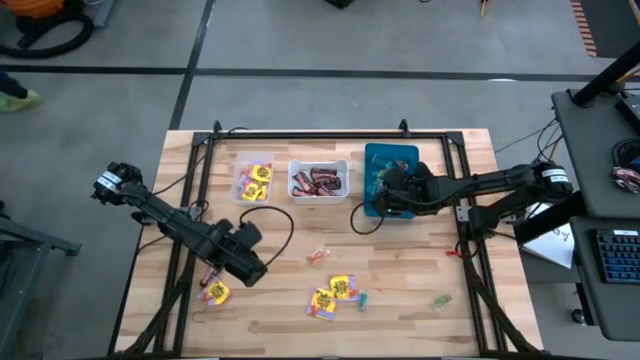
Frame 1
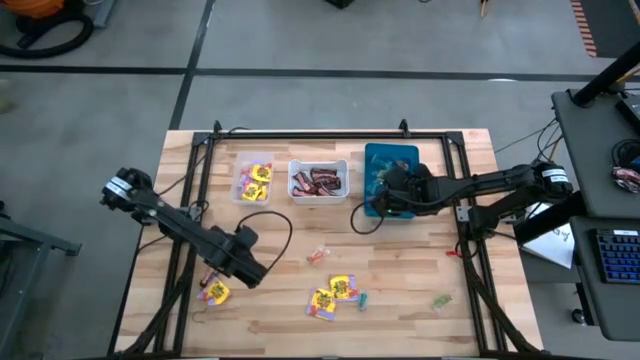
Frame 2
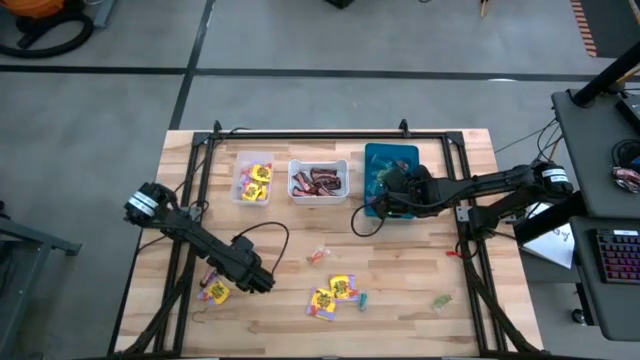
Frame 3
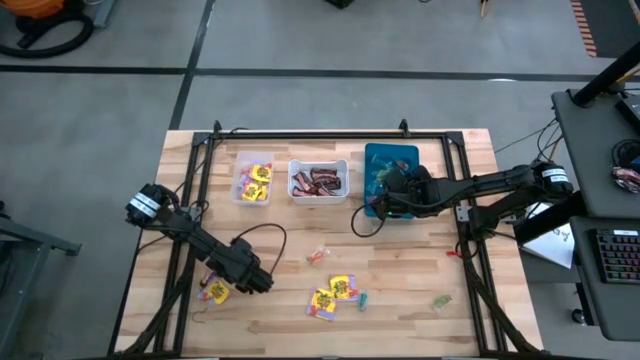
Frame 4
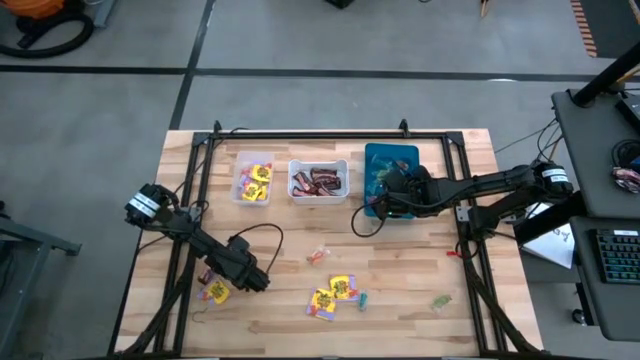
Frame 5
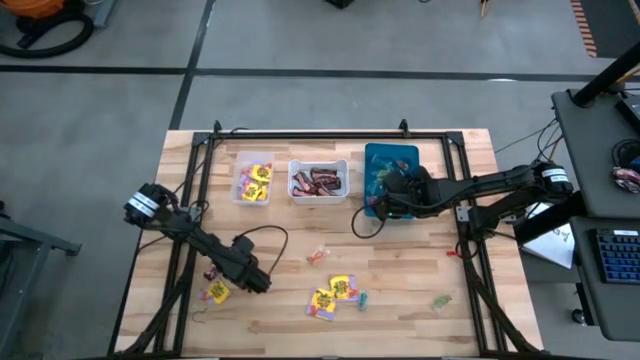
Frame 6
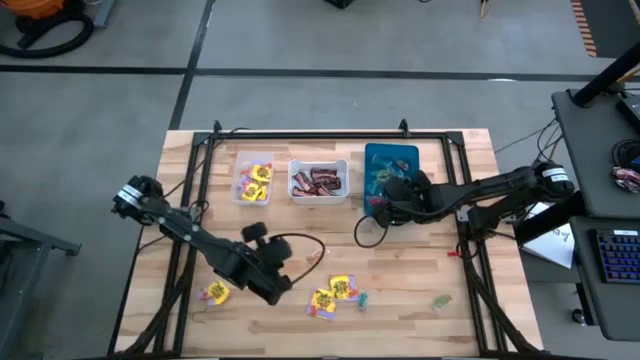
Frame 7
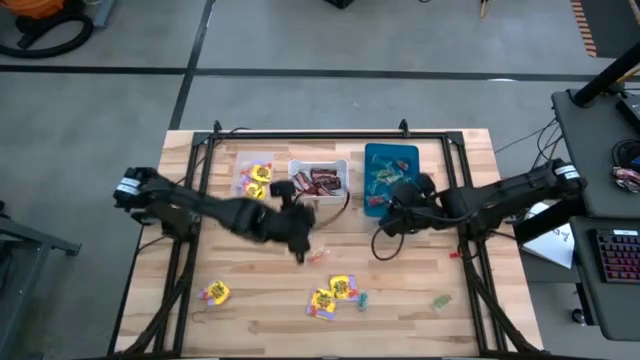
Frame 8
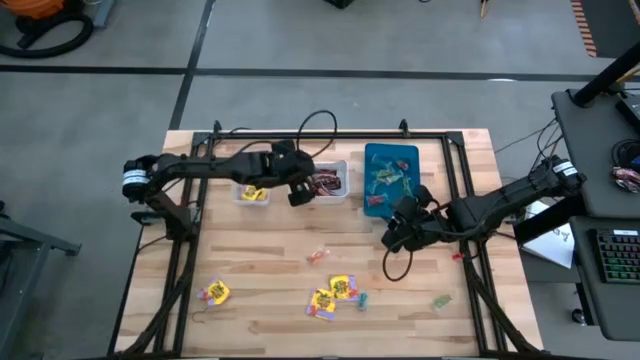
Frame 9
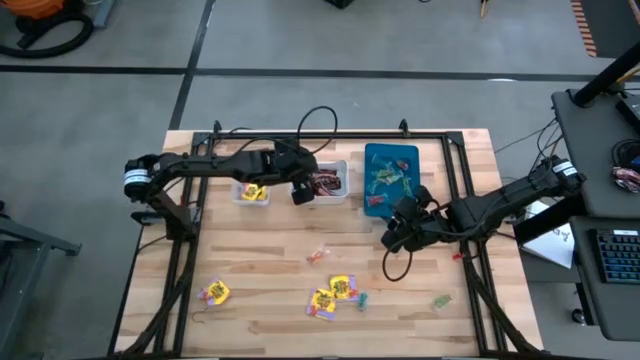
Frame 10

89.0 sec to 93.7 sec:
Task: Sort candy
Put the brown chocolate into the white bin

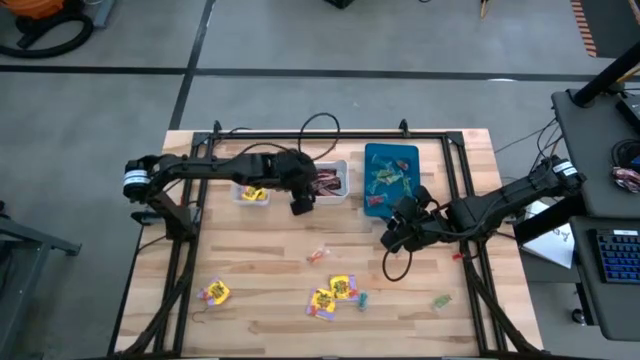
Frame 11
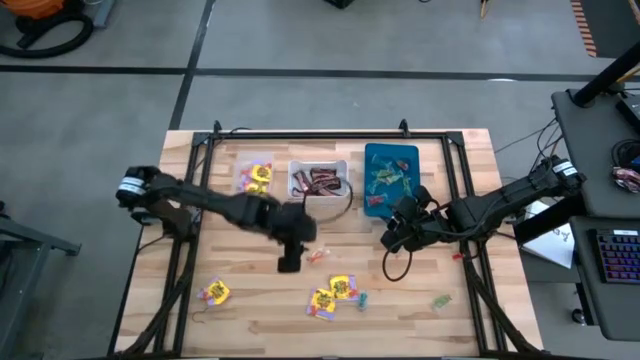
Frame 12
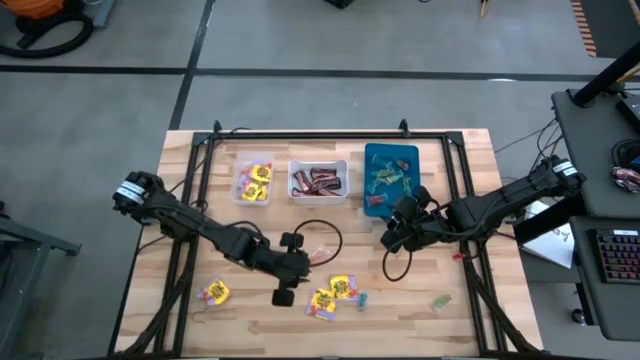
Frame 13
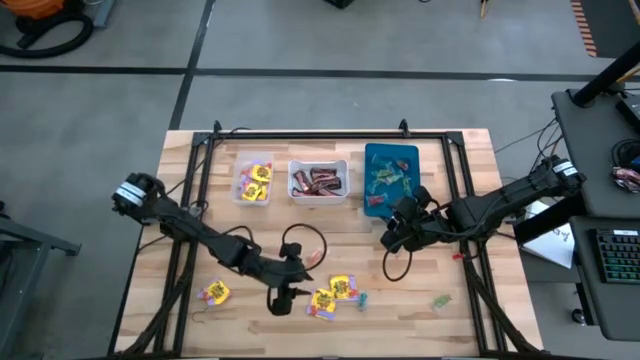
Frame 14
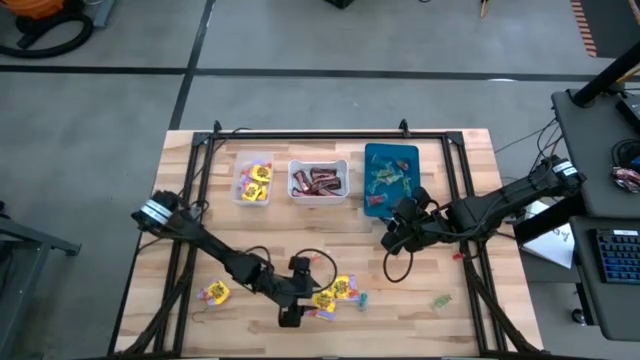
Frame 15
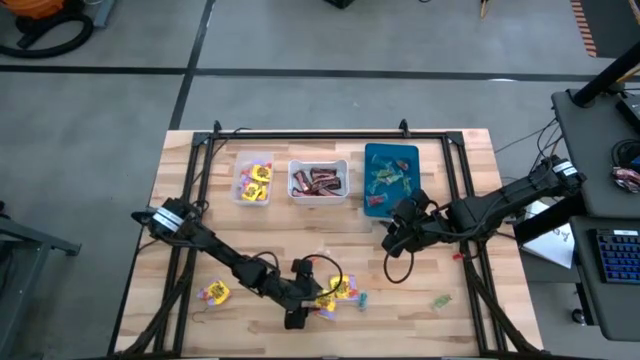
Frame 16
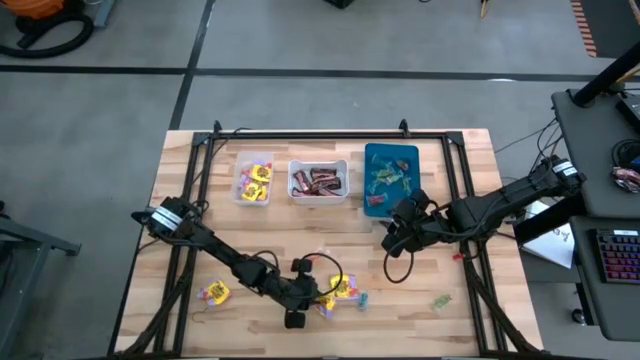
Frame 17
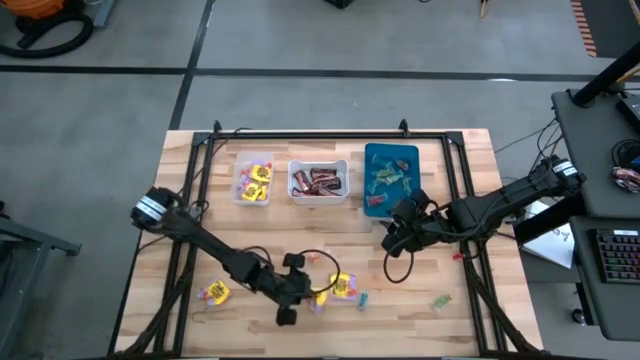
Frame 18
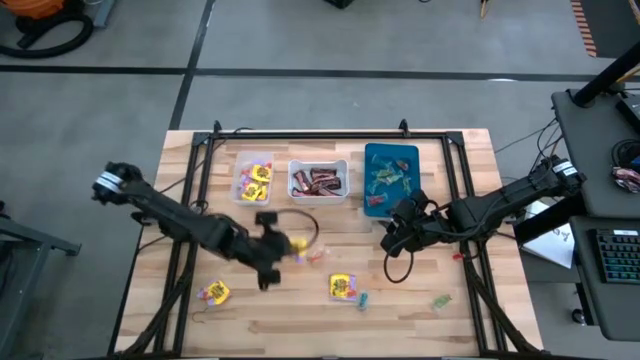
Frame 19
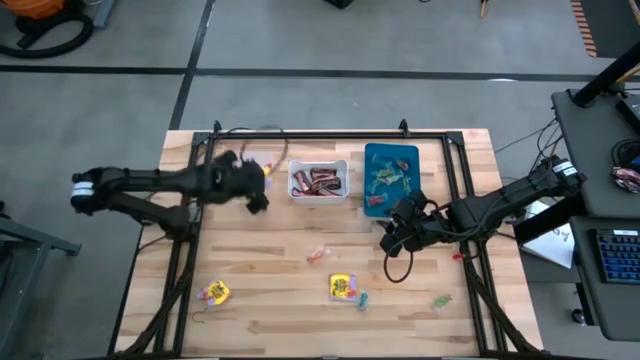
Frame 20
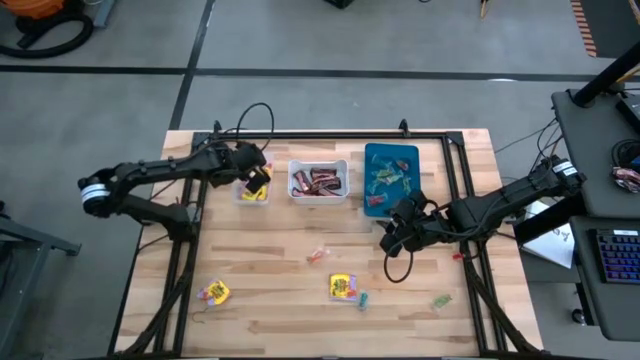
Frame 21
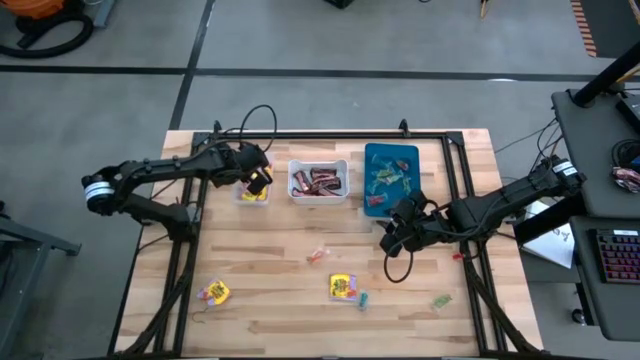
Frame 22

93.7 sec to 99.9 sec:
Put the yellow candy into the transparent bin

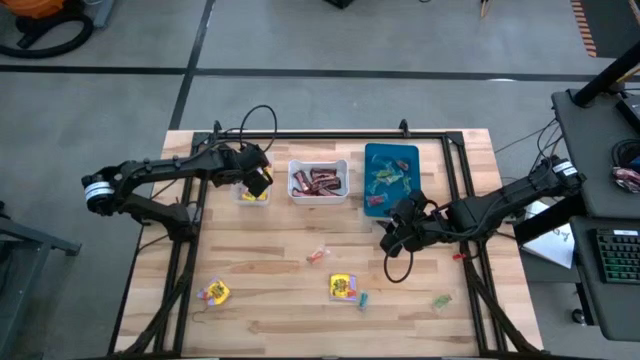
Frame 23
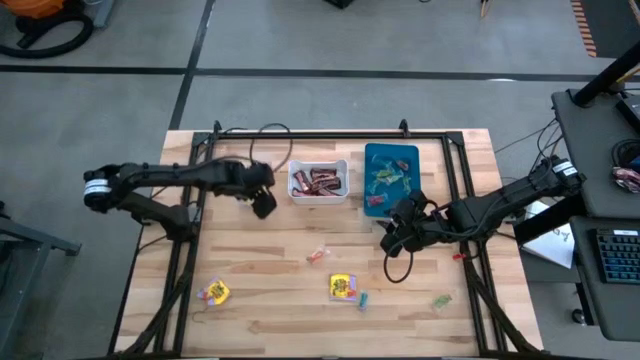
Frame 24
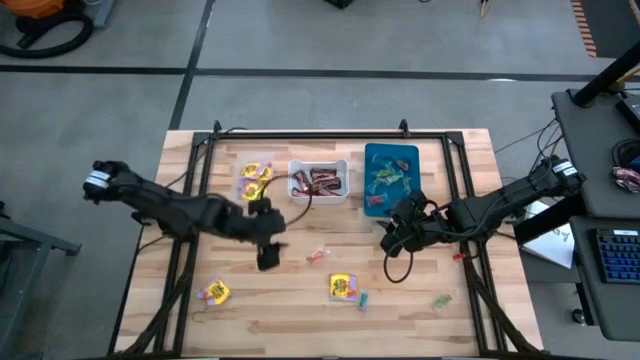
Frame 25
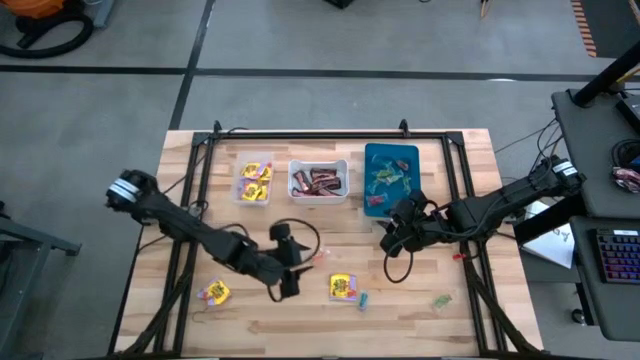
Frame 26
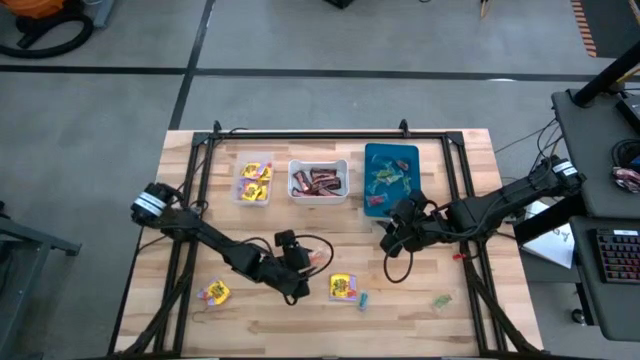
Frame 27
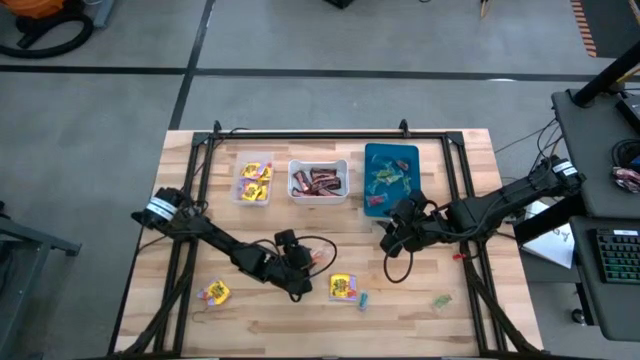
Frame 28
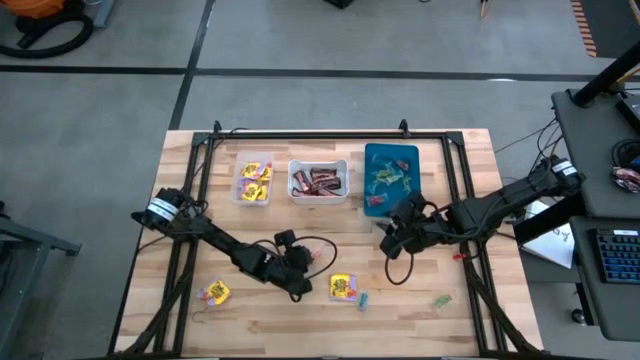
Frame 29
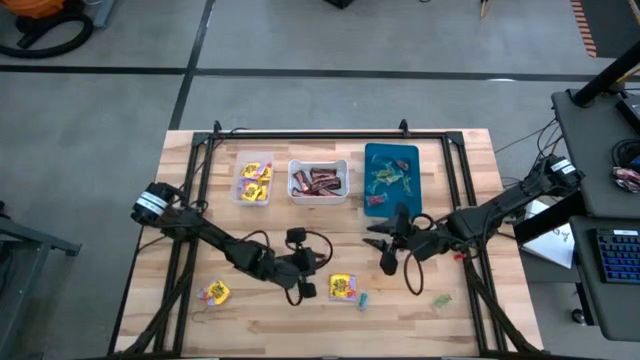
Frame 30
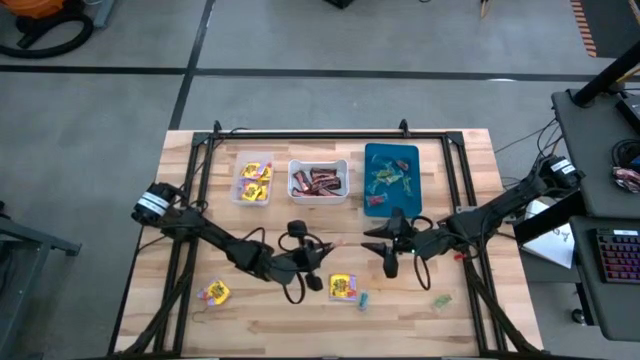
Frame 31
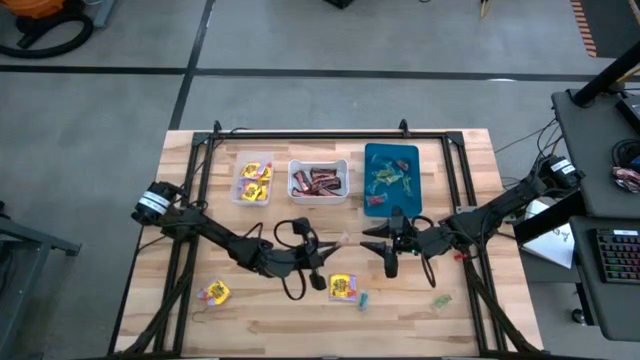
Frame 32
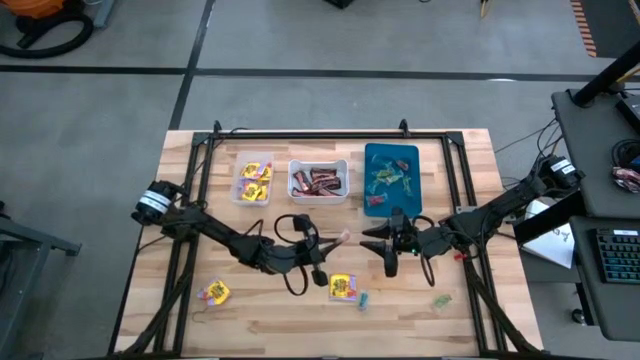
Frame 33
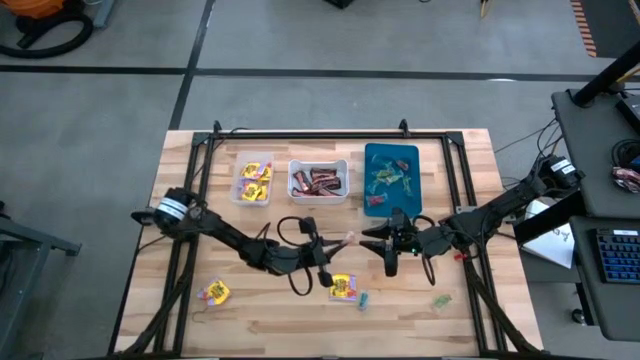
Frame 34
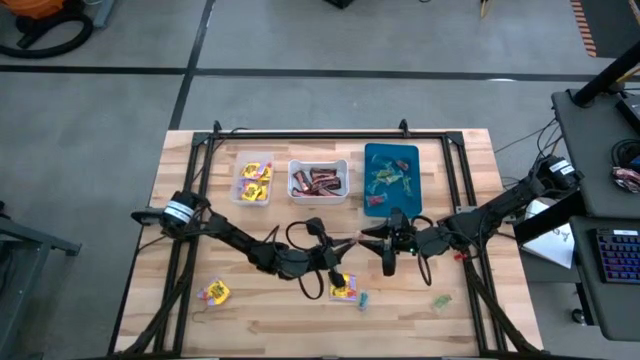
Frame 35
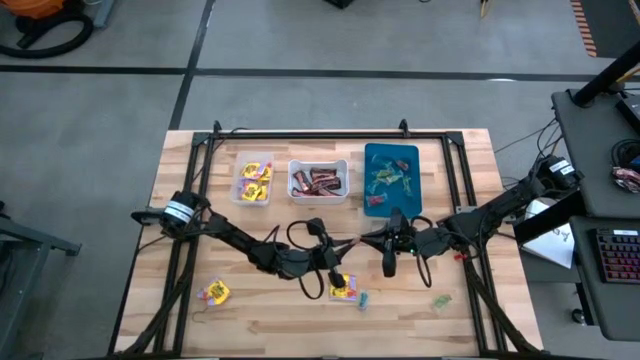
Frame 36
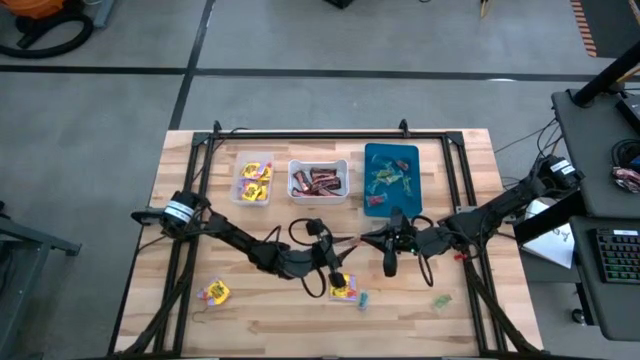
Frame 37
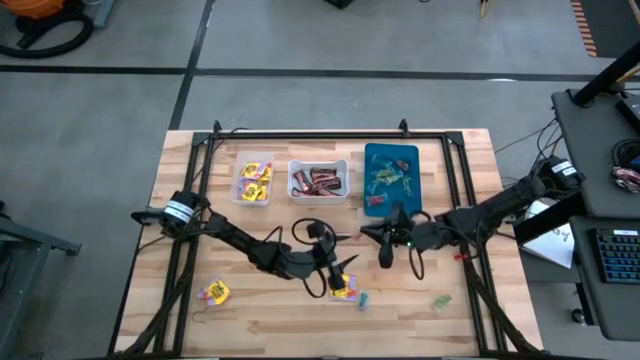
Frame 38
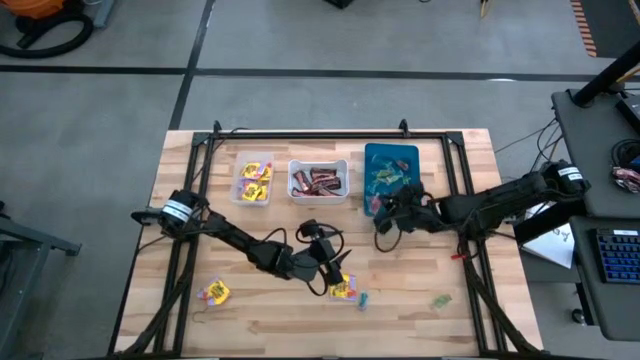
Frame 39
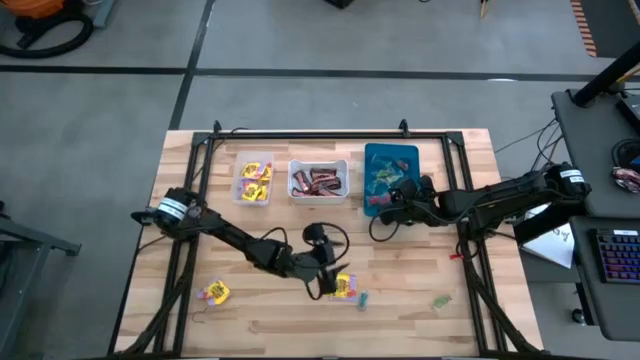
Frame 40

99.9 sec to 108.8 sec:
Put the orange candy into the blue bin
